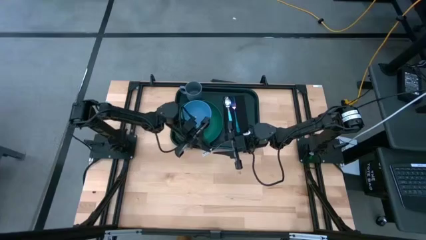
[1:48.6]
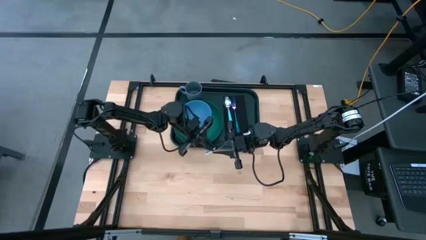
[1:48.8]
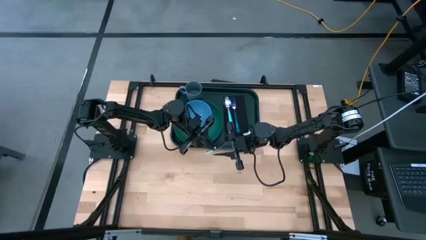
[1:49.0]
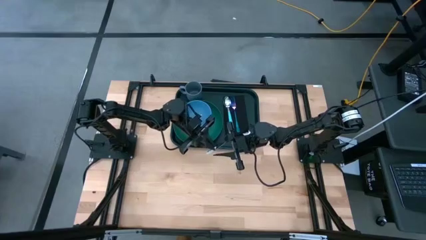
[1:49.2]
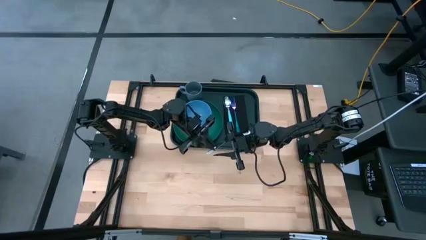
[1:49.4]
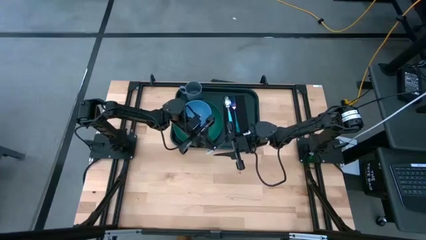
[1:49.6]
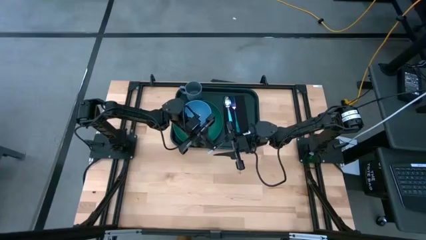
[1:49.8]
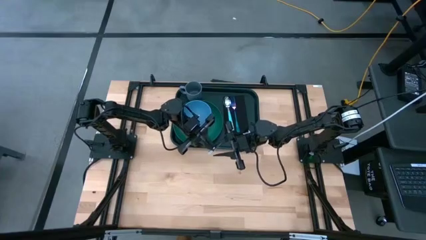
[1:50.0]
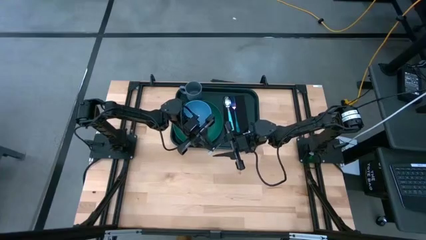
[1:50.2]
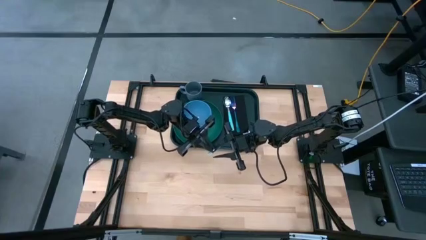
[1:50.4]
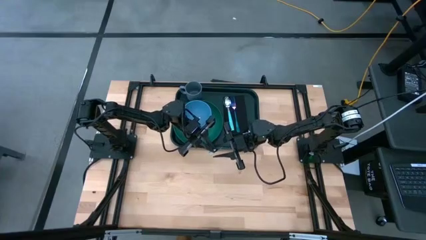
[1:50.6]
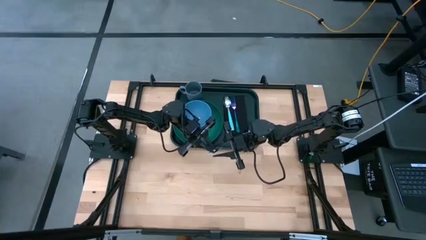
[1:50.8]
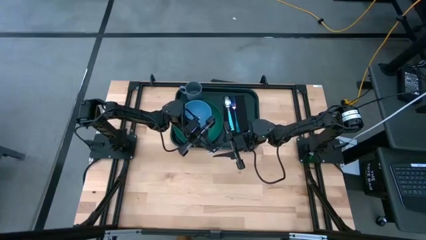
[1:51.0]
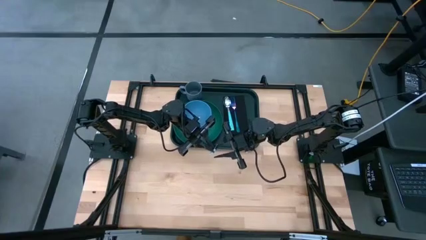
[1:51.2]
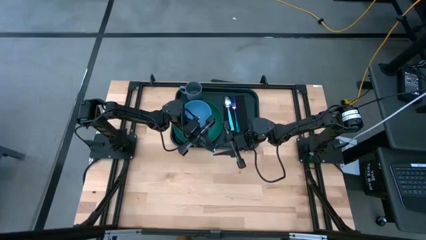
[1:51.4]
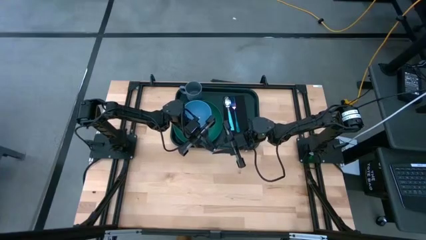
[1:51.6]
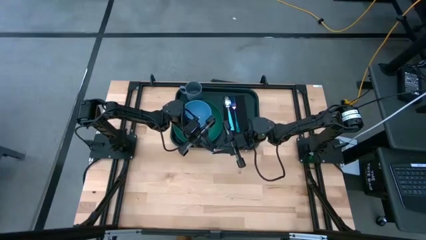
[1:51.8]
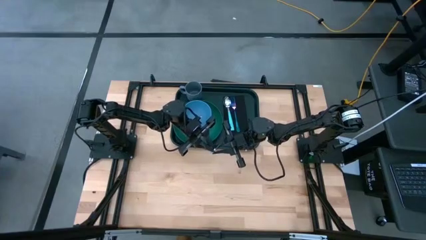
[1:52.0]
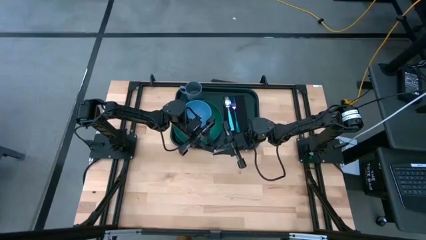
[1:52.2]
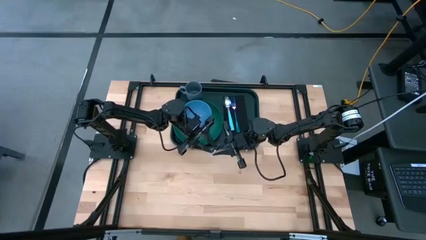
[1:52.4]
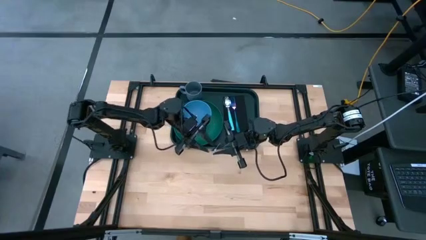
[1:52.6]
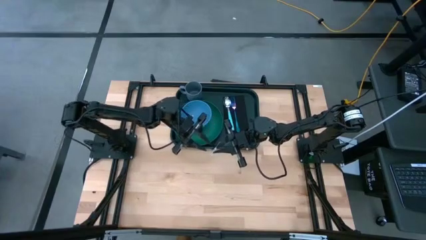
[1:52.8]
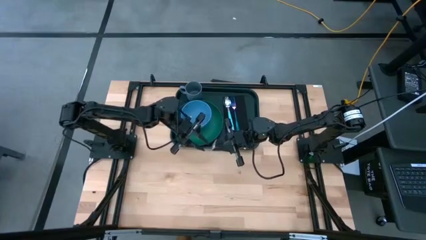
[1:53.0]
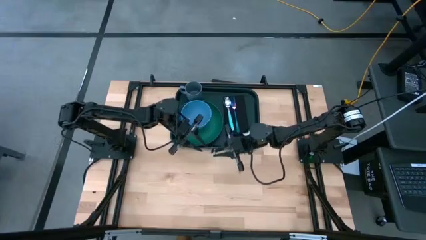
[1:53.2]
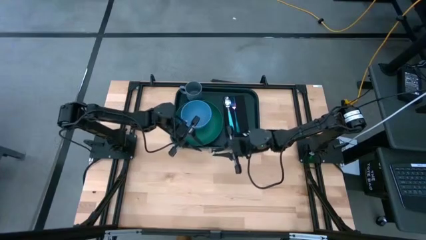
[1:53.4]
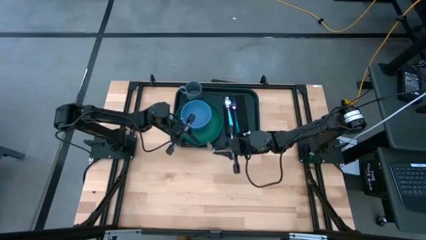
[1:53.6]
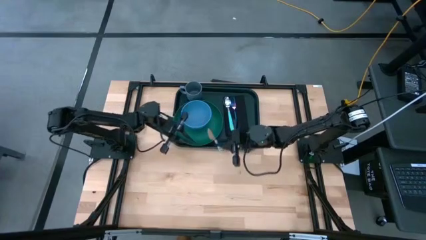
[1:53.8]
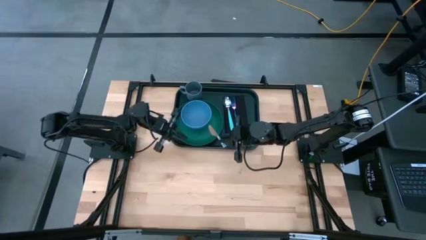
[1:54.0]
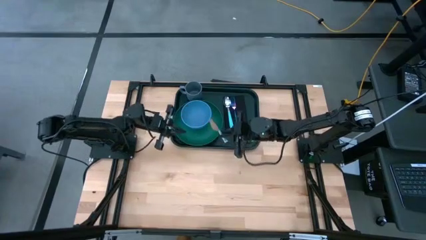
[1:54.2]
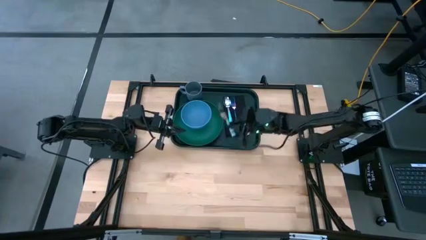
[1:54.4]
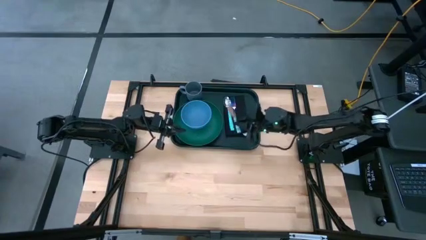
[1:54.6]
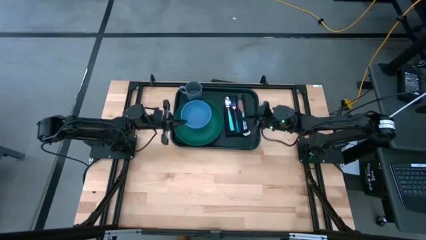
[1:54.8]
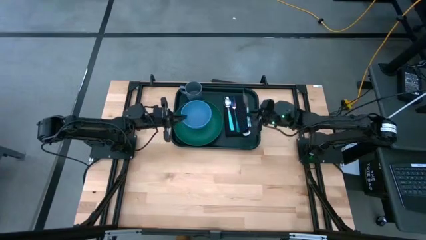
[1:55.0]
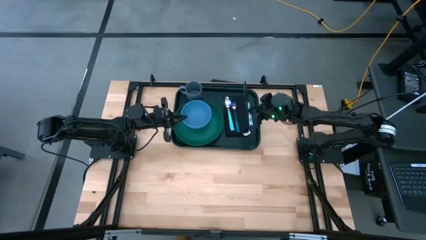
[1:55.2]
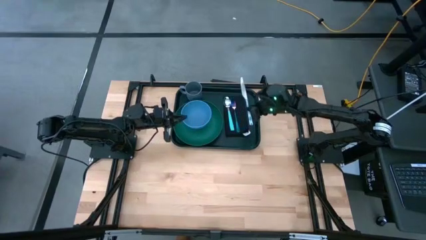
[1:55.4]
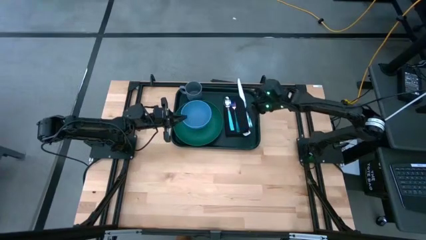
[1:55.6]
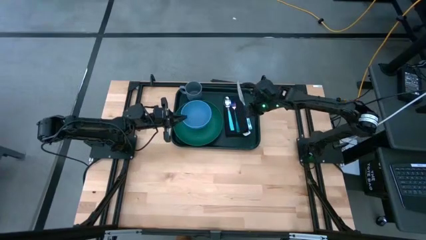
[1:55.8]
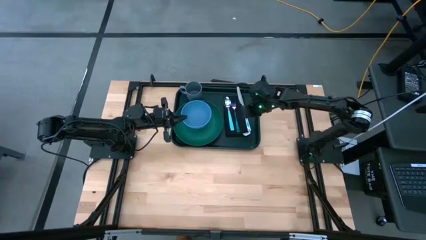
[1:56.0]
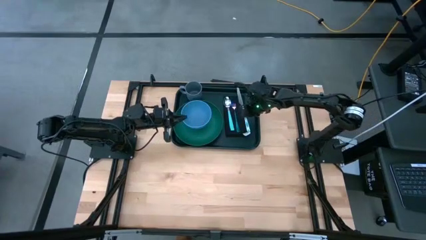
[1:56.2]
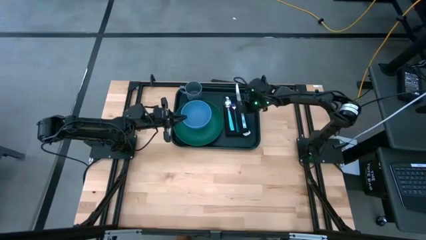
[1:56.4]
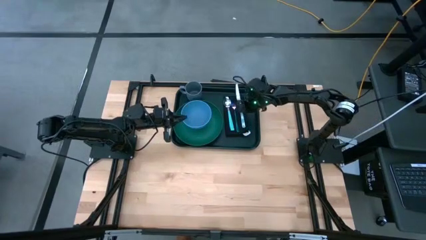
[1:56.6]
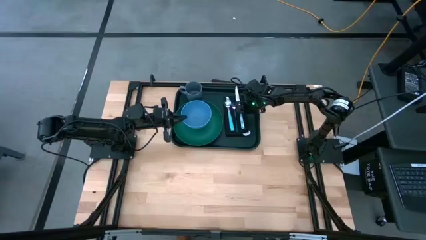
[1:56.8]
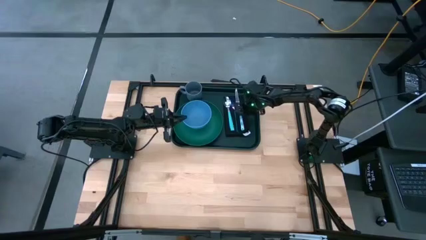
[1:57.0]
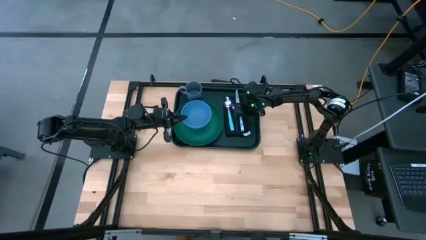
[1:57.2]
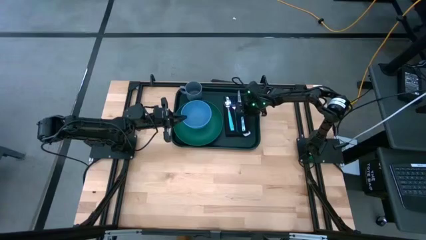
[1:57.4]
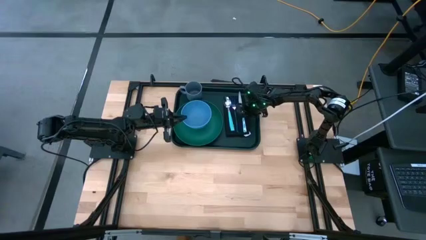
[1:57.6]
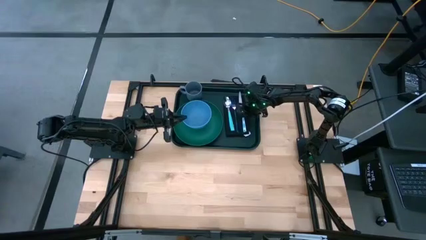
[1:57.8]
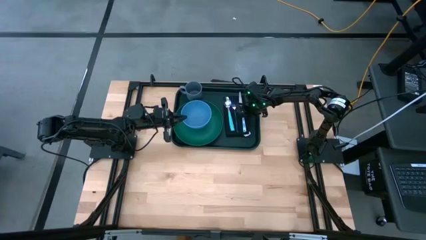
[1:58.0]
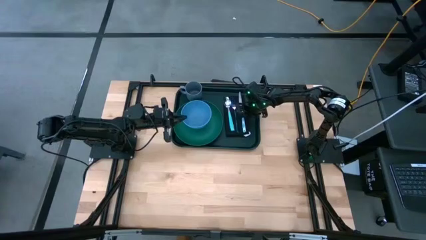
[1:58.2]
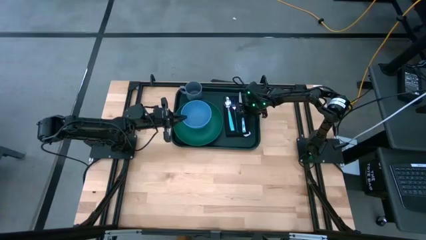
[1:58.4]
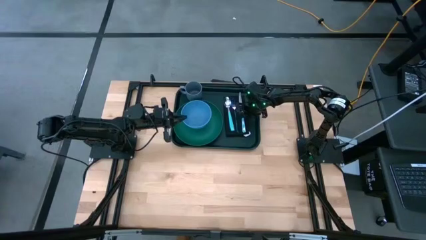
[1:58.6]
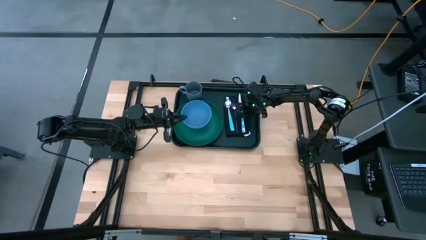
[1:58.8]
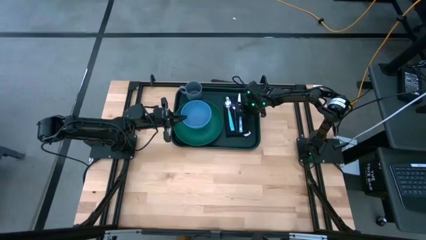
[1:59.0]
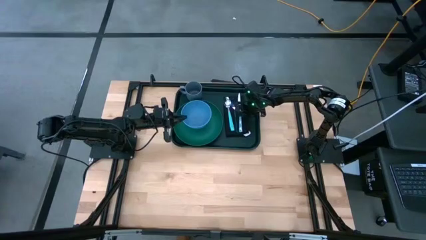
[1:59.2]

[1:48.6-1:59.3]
Task: Set up tray
Put the white and blue knife on top of the black napkin to the right of the purple fork

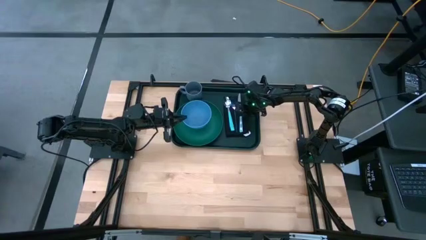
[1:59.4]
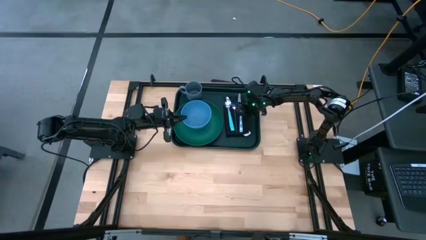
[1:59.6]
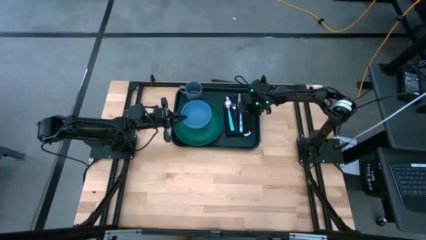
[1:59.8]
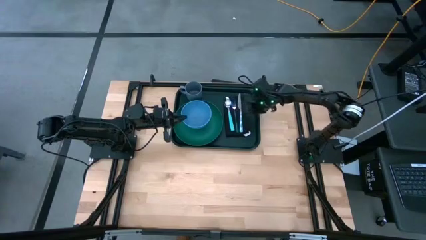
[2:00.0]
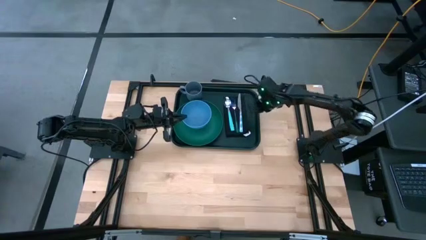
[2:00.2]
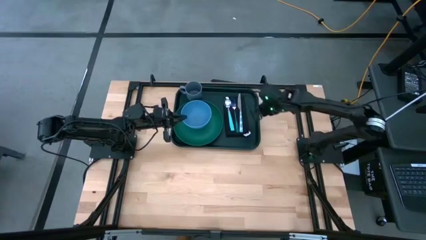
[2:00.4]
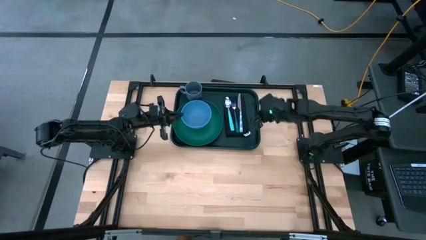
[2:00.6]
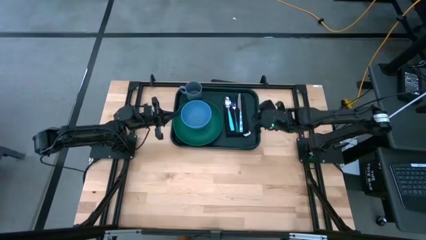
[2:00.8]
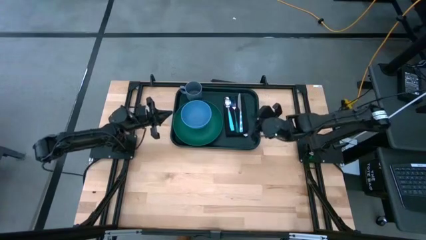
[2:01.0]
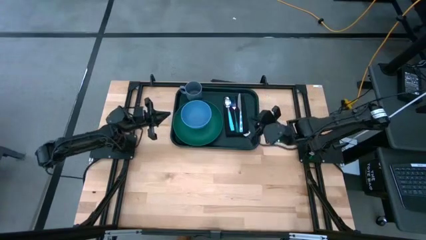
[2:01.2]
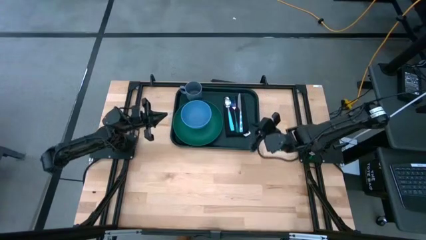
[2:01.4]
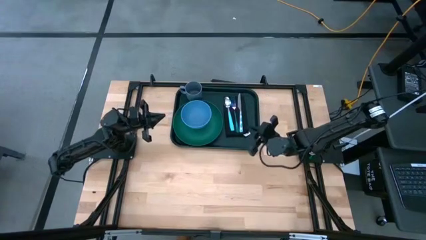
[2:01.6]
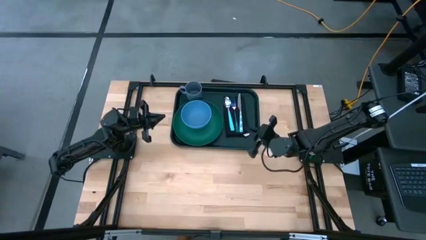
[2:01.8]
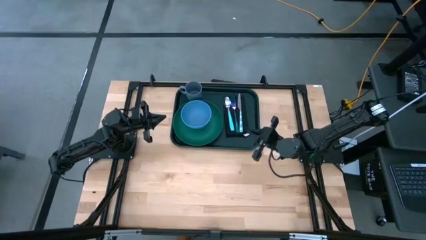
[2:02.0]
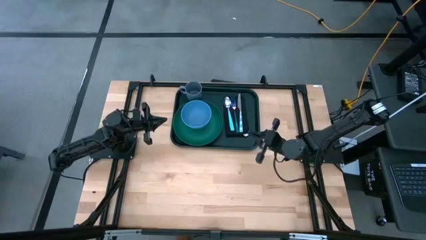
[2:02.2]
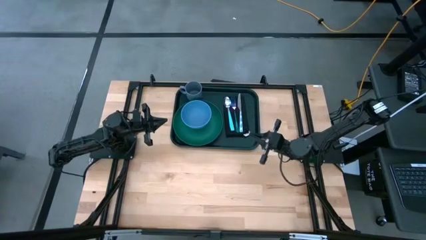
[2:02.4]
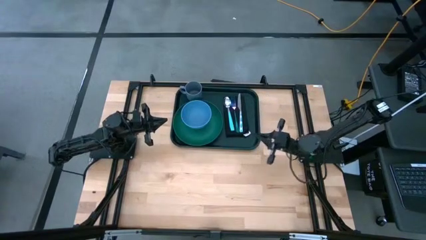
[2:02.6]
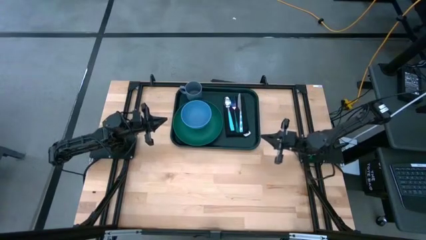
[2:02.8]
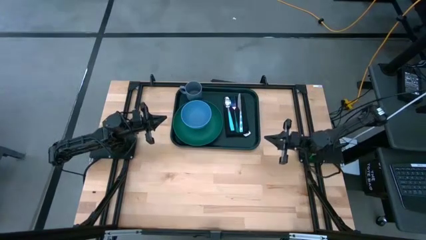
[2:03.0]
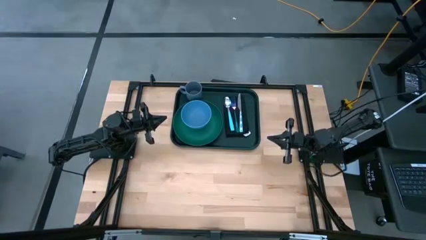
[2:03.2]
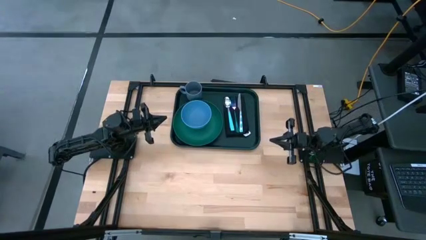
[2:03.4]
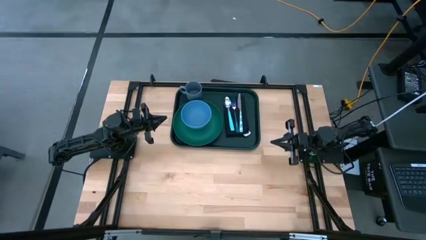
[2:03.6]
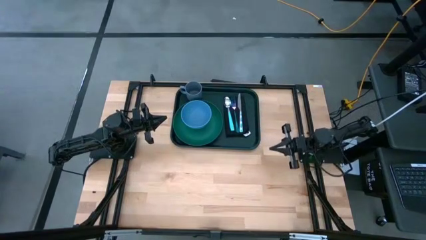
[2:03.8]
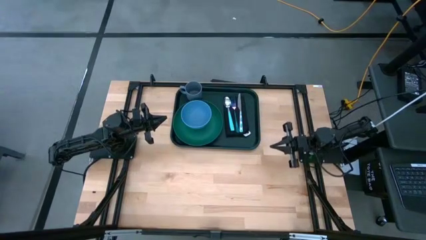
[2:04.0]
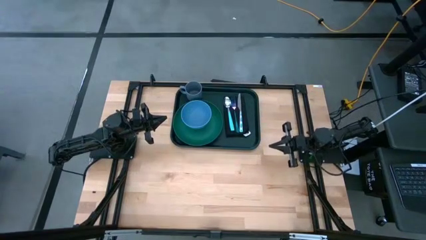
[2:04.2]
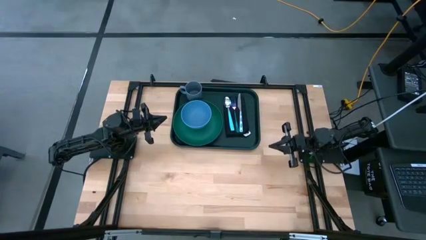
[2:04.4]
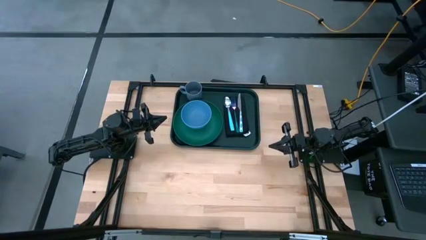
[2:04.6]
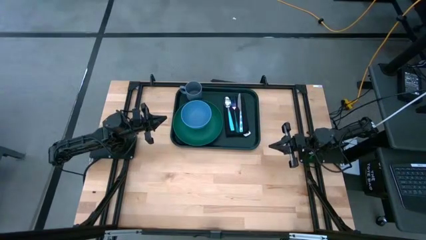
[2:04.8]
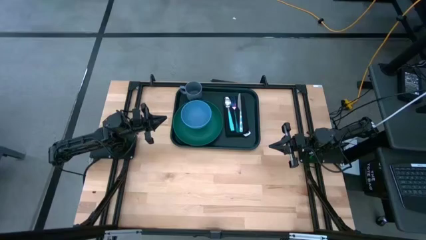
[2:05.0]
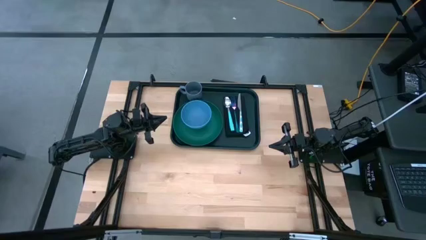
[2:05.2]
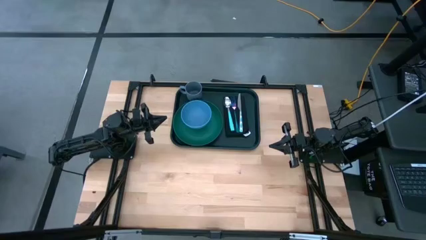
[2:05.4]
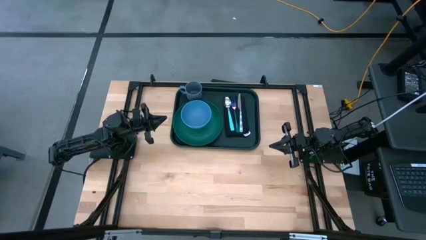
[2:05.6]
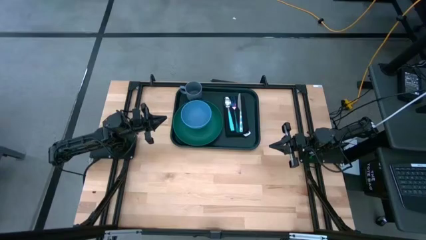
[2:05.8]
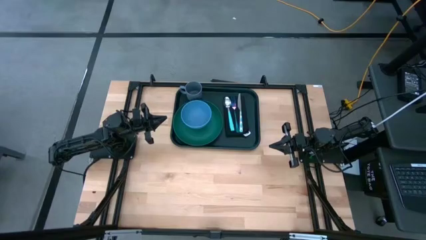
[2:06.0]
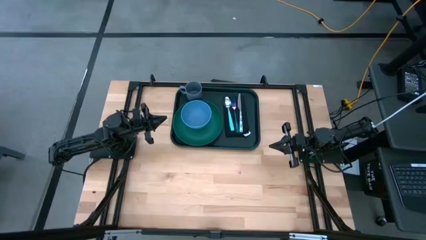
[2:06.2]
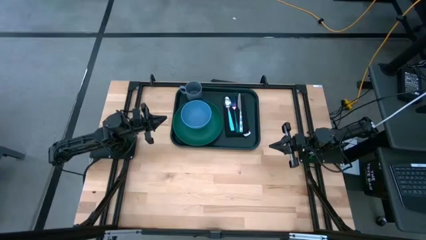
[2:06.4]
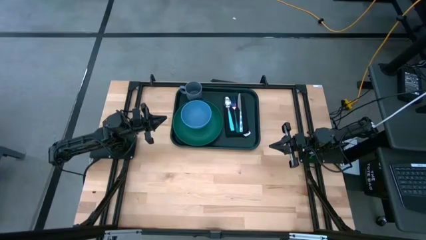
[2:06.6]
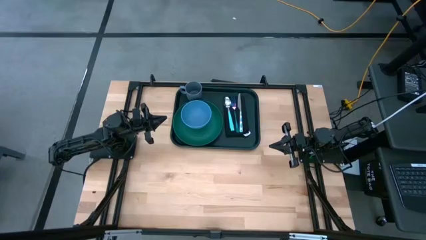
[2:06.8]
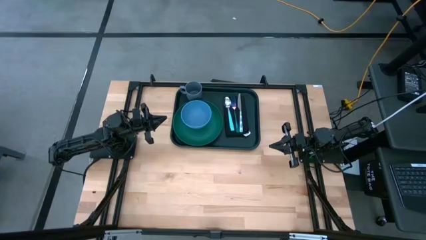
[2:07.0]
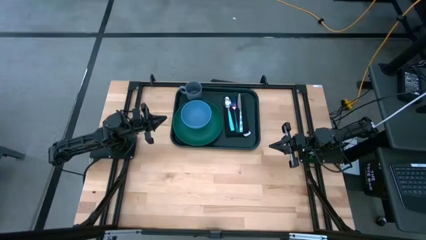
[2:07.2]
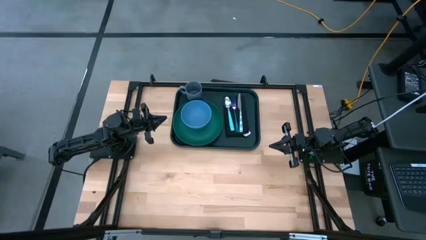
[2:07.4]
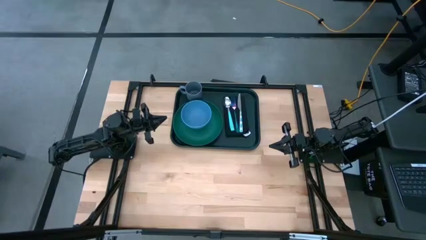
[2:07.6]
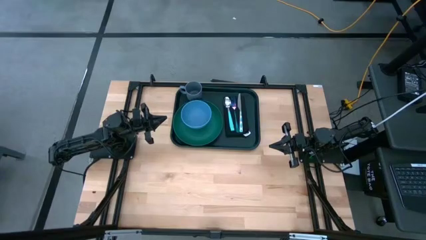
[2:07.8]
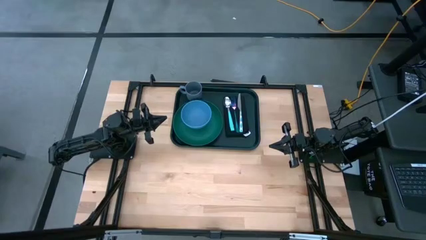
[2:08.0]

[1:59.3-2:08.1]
Return to Home Position
